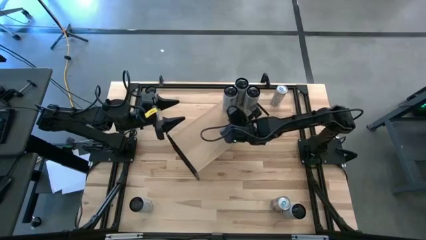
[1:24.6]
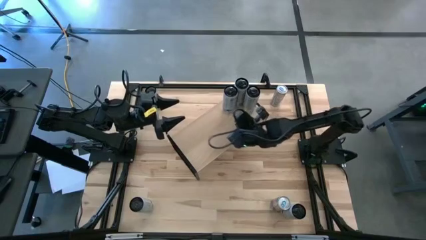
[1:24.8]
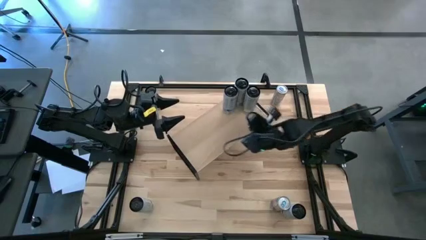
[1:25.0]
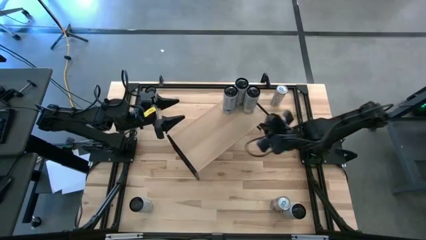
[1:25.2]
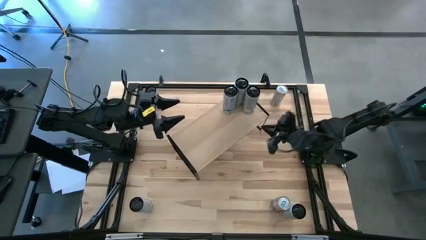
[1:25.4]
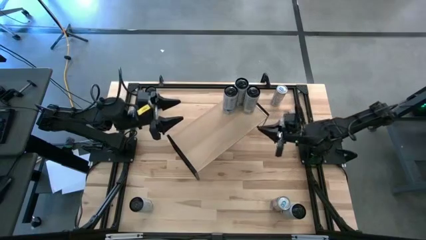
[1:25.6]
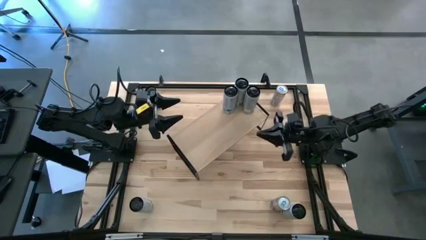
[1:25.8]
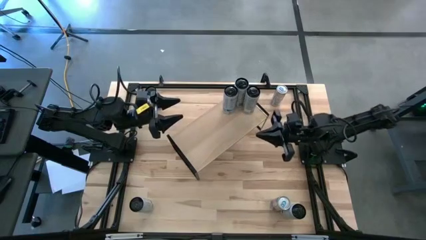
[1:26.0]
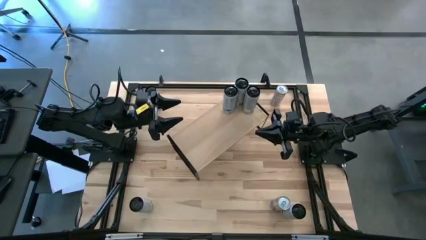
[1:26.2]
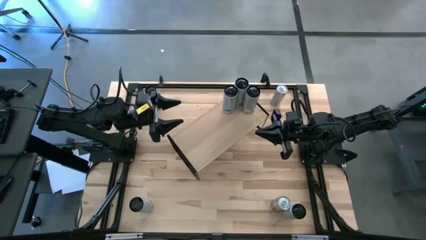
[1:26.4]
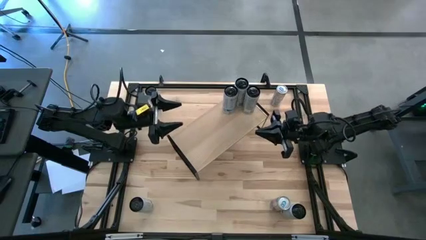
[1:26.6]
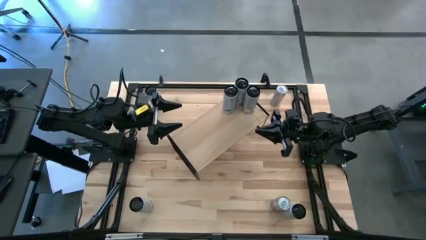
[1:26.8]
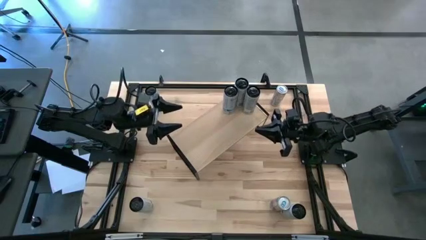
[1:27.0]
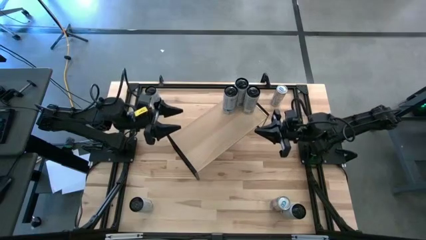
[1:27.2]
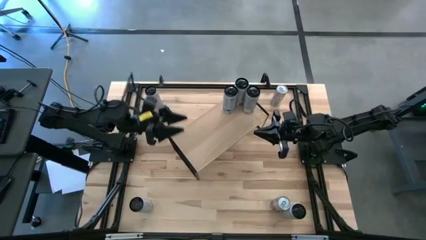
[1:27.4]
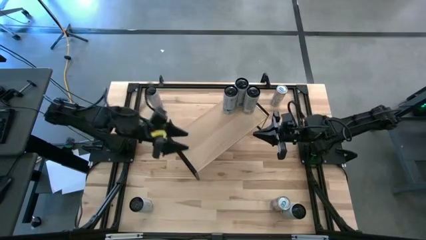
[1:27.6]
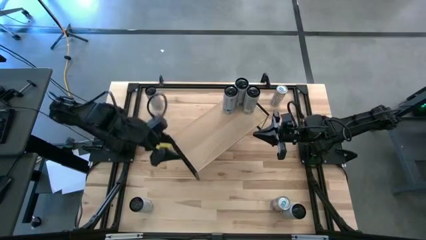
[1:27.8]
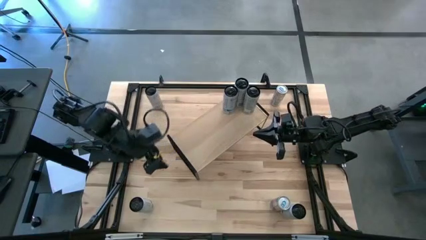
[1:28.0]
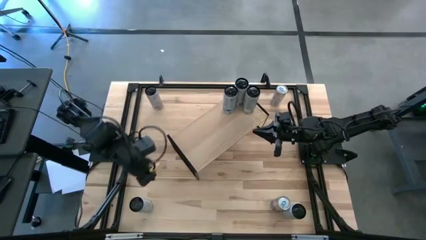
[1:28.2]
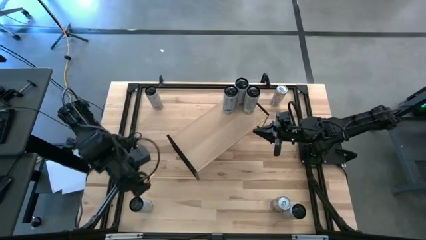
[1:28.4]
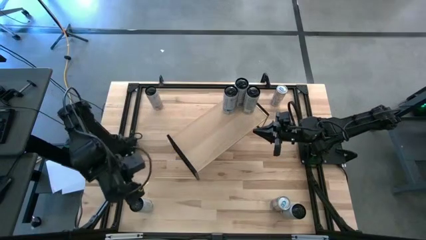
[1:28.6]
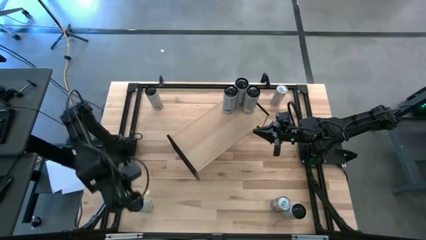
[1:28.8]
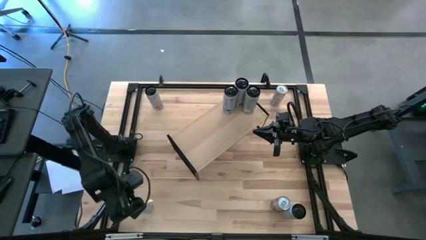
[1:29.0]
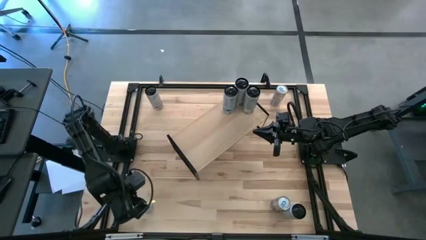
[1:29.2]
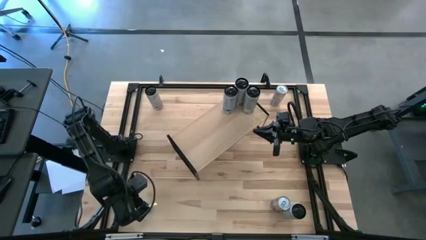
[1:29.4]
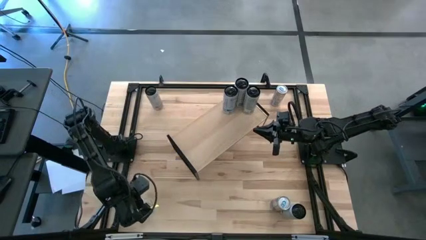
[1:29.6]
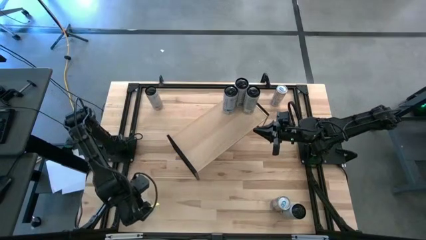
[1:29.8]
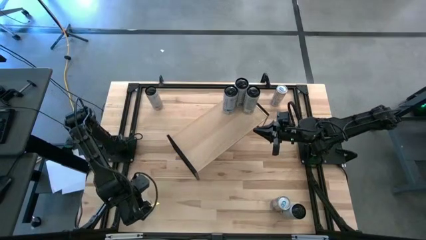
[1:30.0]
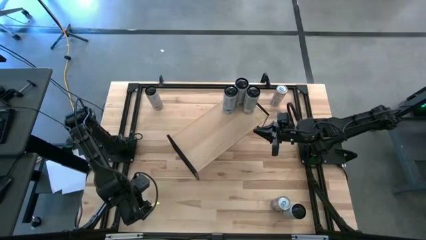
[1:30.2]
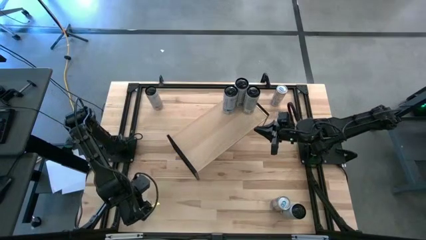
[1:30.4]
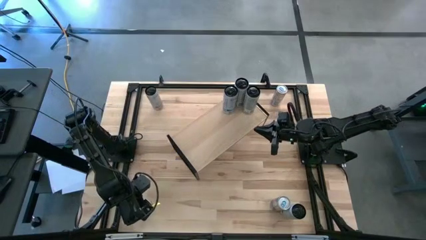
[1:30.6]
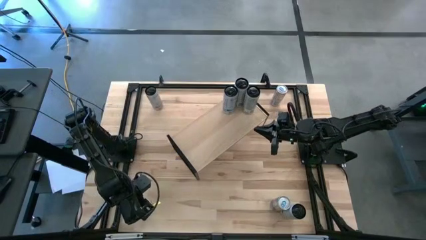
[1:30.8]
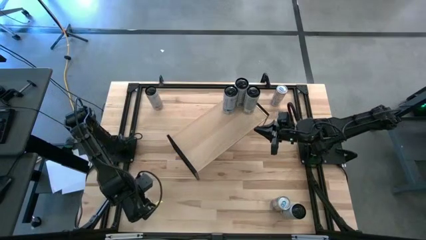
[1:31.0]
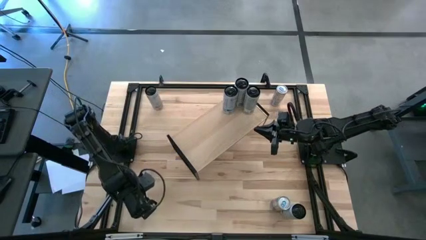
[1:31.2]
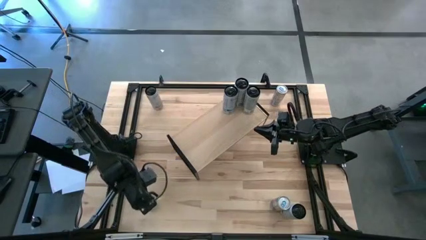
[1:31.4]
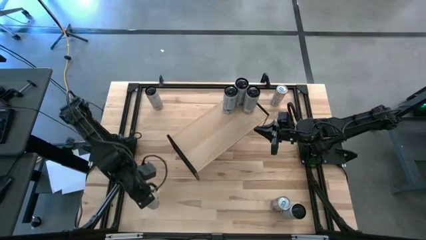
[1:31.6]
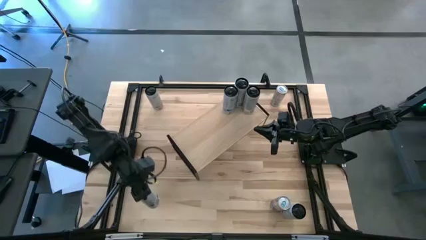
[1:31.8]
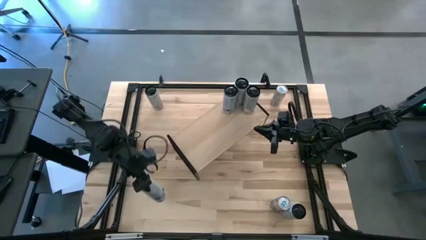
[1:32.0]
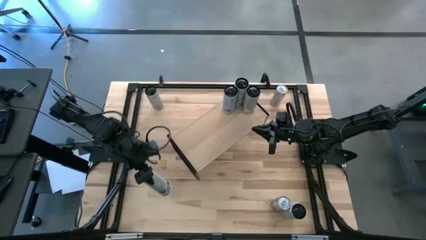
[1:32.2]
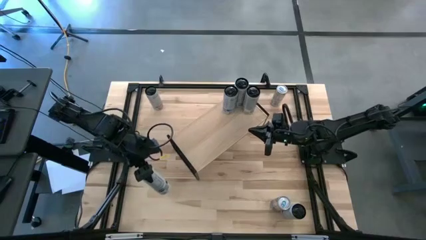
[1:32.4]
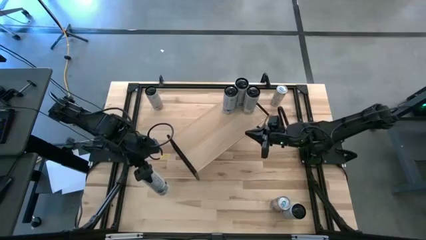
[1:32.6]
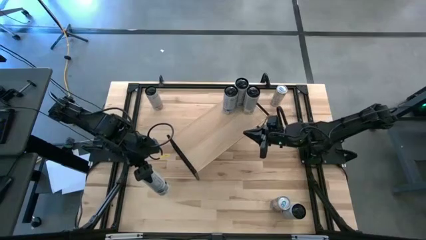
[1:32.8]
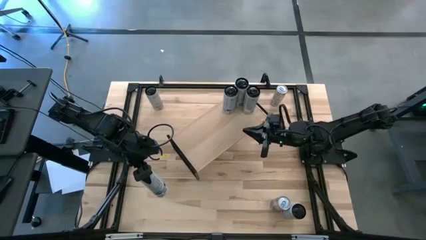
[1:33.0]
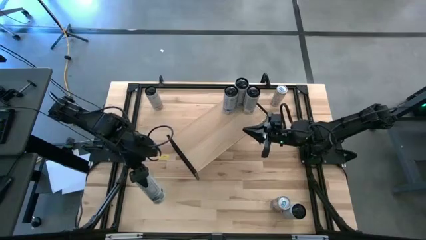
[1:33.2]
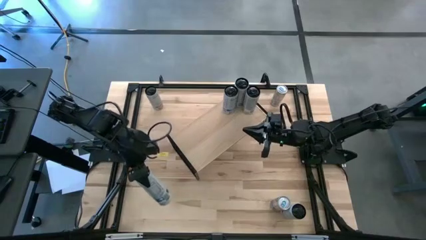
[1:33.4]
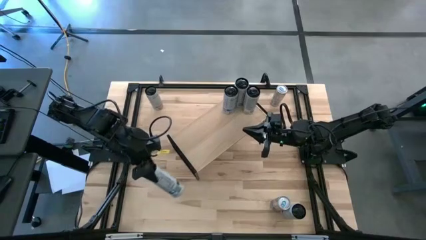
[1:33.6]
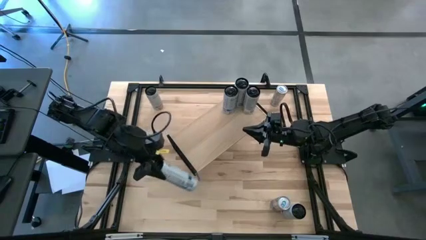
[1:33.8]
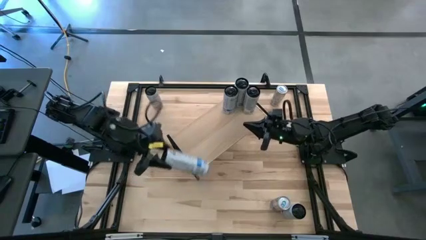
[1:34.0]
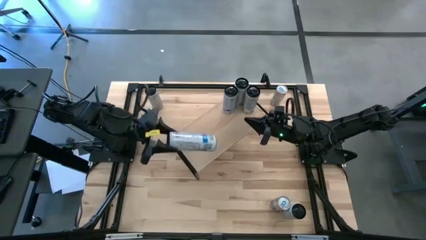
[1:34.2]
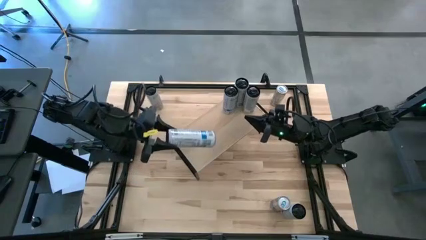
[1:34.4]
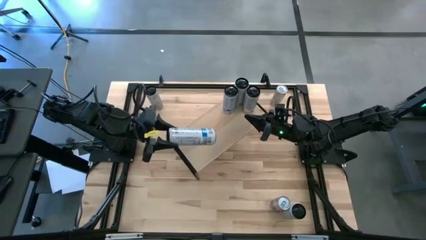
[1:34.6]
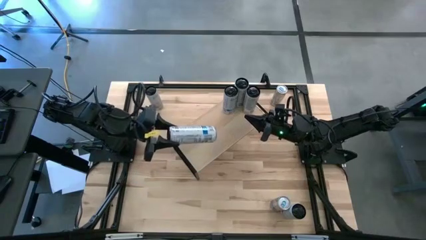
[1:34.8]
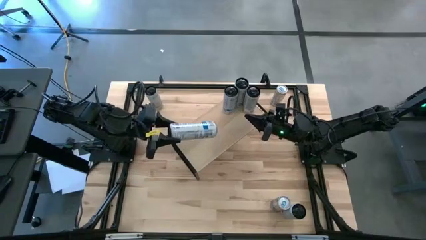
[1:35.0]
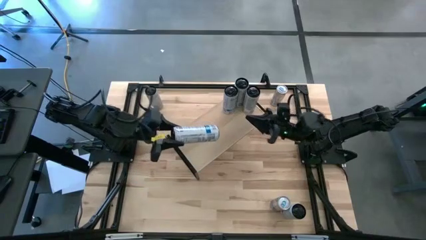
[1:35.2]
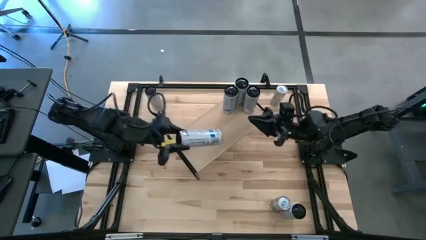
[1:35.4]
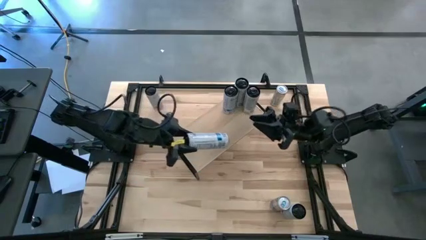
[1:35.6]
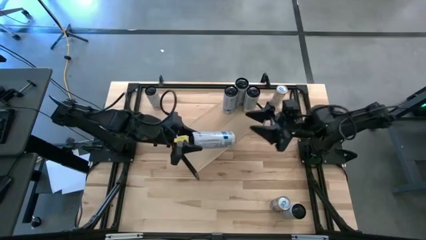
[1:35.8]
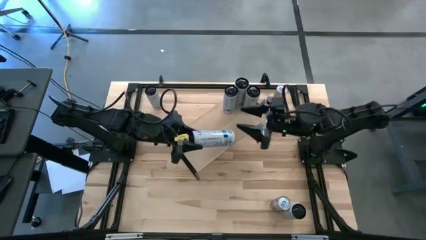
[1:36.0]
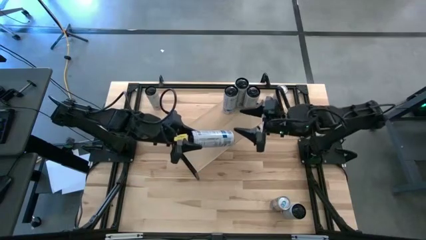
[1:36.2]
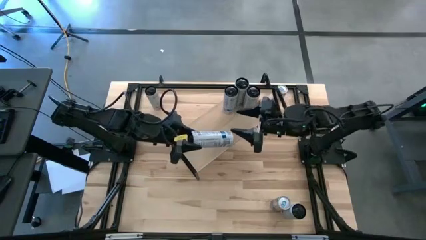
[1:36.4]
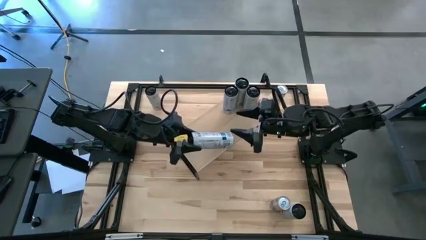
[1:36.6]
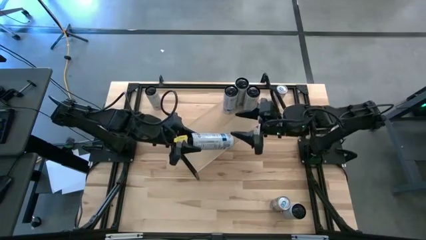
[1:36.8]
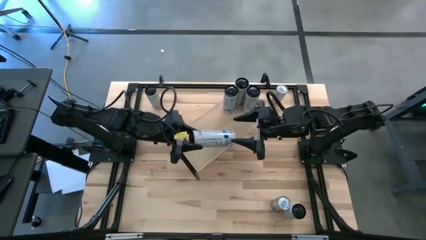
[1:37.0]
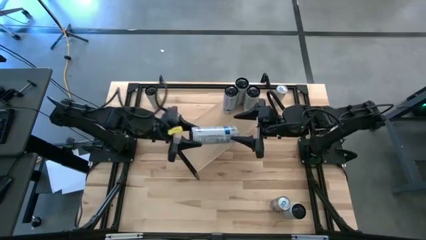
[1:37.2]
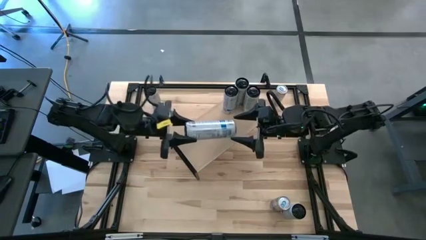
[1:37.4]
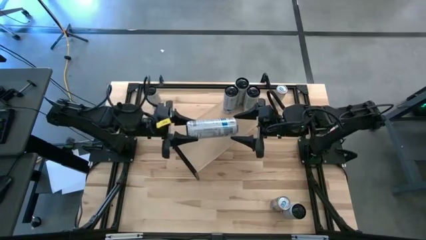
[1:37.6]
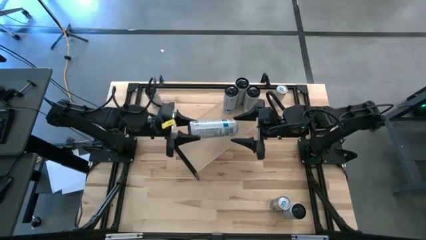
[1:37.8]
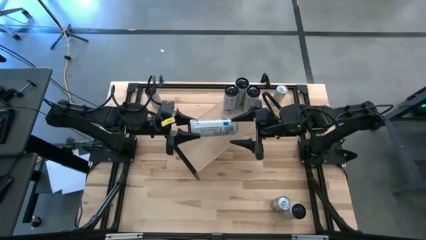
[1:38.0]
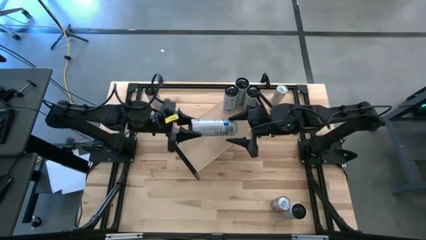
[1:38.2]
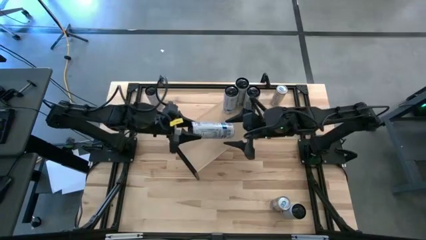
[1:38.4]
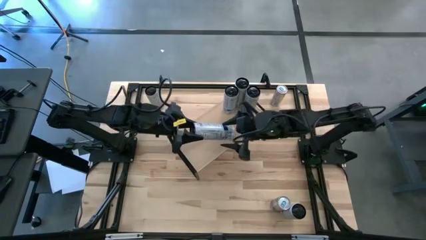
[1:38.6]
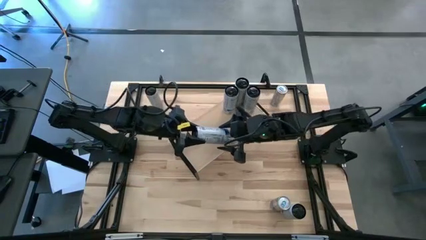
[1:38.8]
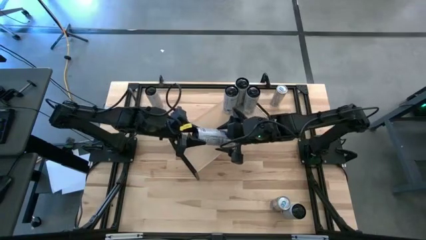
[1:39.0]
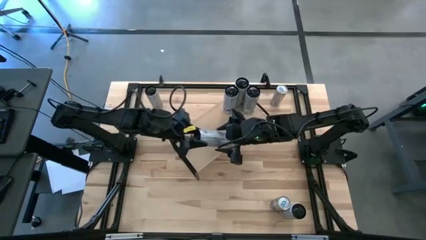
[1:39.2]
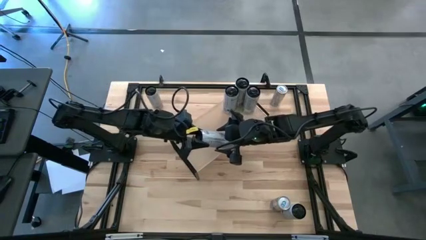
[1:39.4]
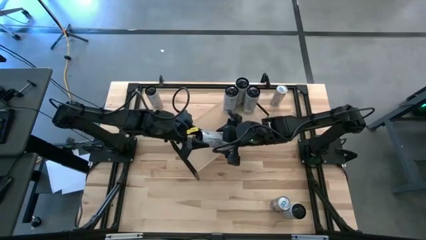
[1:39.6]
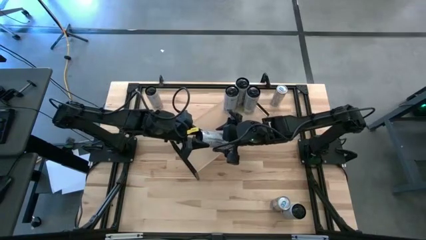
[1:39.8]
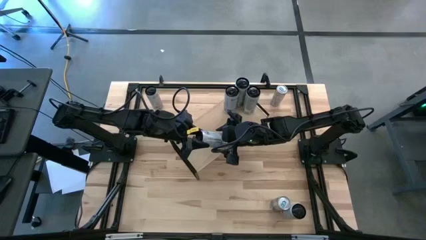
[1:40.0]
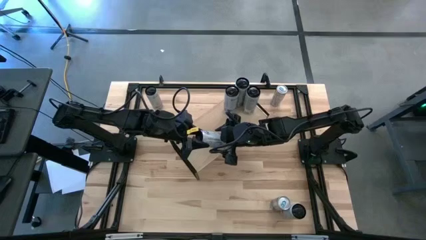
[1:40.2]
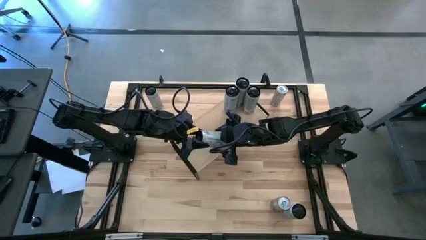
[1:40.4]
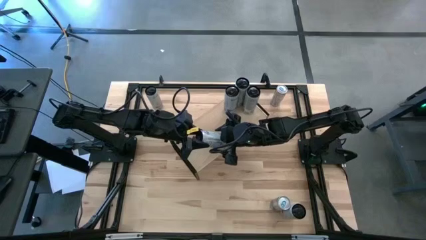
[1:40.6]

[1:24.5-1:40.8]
Task: Place canned beverage on shelf
Put the white-blue soda can on the shelf and align it with the other white-blue soda can
